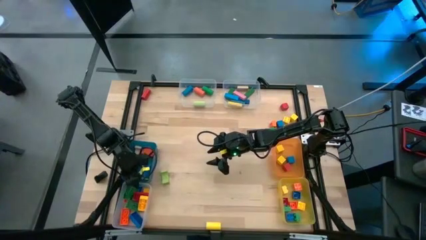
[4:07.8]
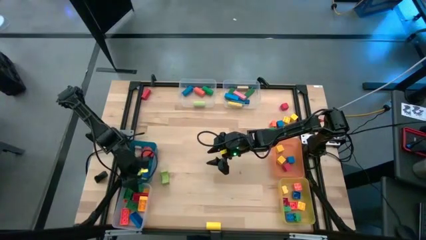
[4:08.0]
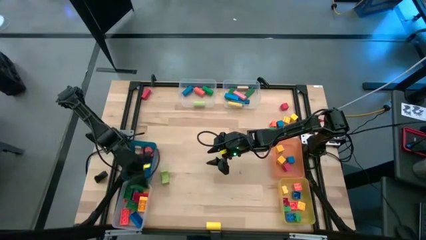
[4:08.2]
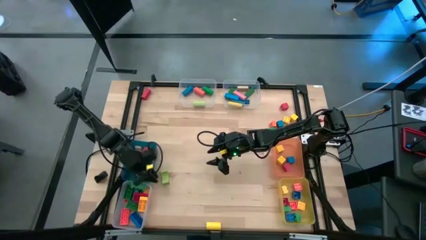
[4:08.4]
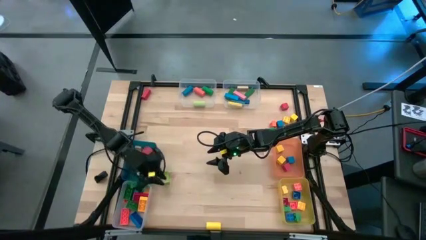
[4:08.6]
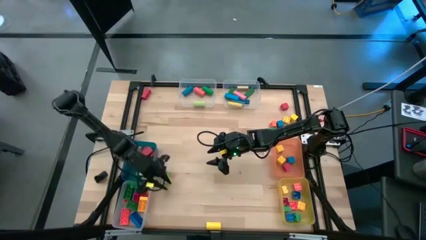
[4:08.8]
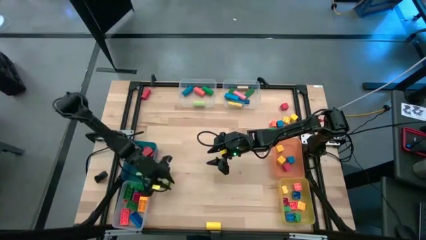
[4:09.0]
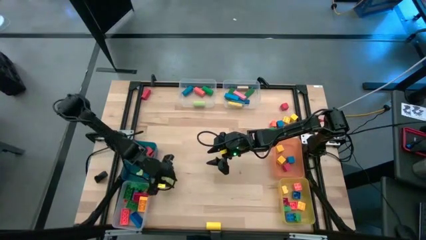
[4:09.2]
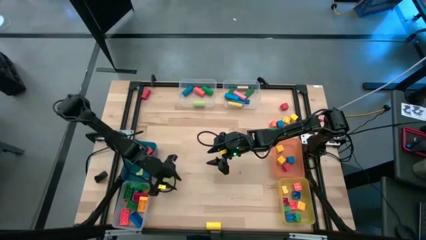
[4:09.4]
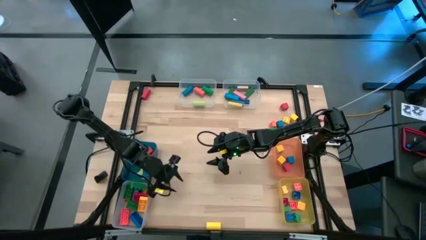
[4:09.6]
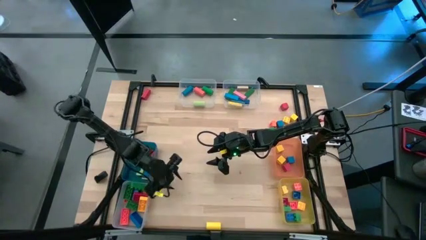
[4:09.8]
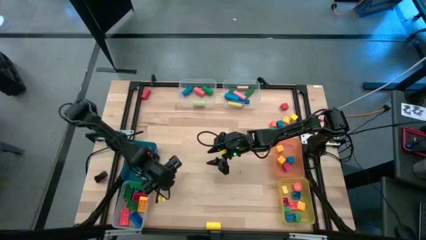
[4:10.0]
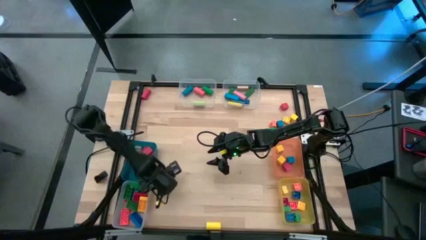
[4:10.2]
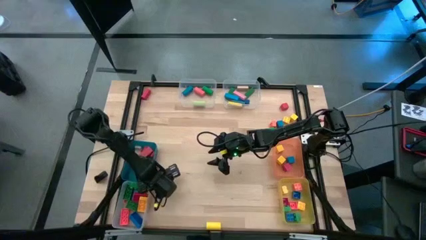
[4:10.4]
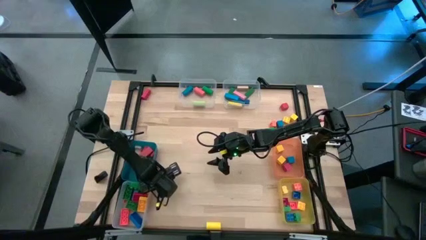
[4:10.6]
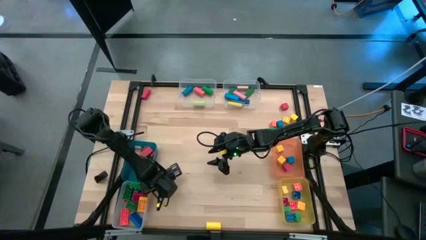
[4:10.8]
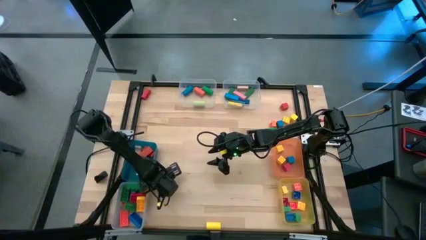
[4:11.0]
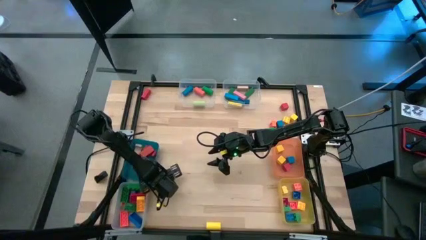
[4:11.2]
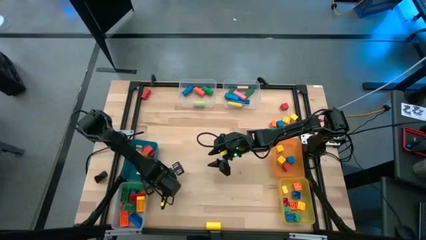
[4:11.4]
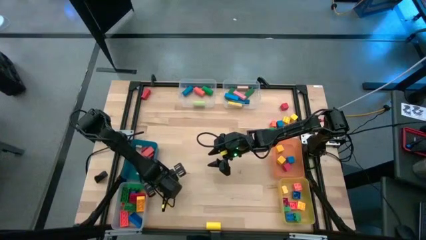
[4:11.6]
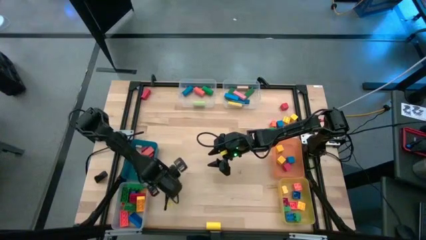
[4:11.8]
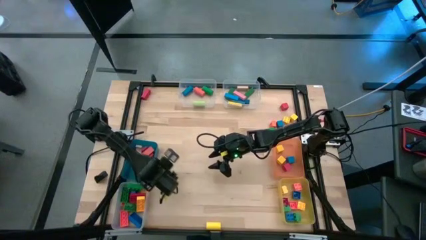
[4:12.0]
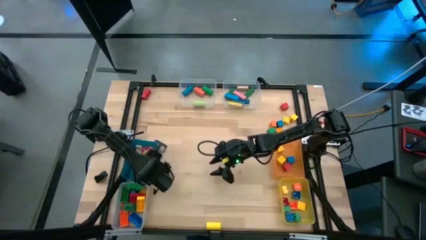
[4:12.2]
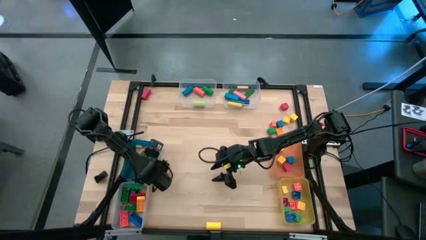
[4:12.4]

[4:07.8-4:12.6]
Task: Sort blocks by size
Put the light green block into the blue bin

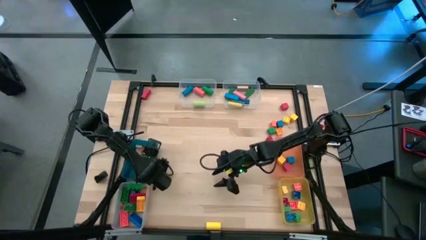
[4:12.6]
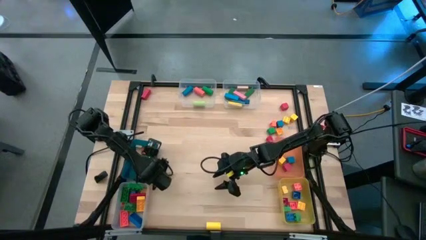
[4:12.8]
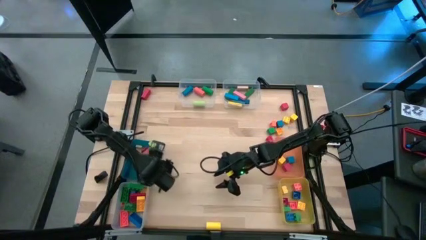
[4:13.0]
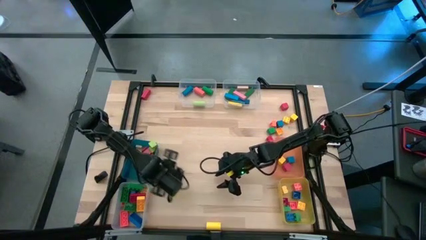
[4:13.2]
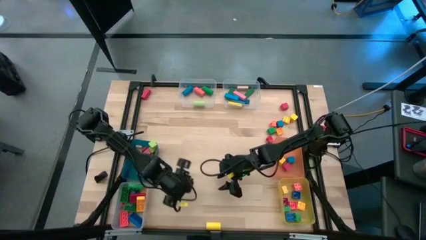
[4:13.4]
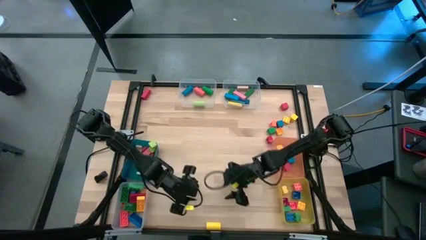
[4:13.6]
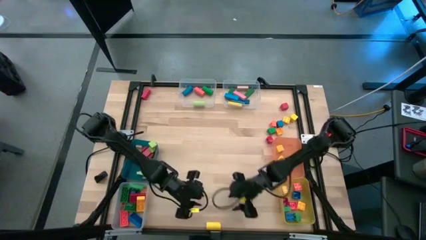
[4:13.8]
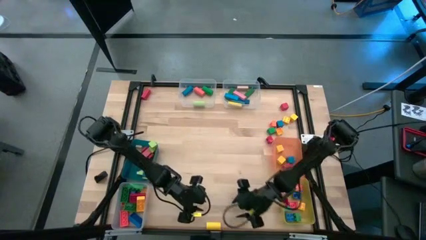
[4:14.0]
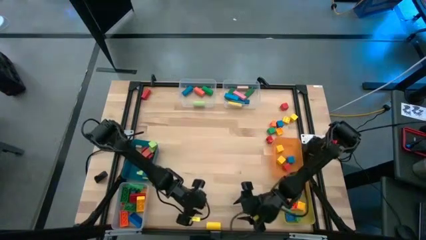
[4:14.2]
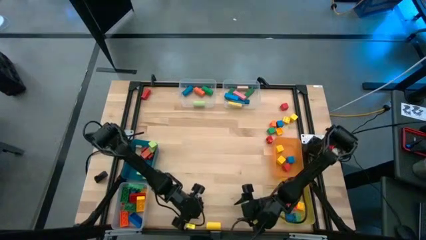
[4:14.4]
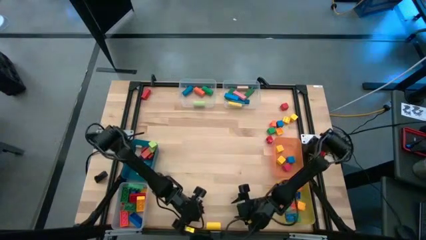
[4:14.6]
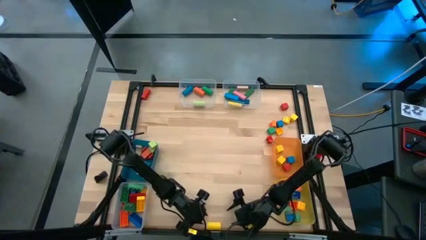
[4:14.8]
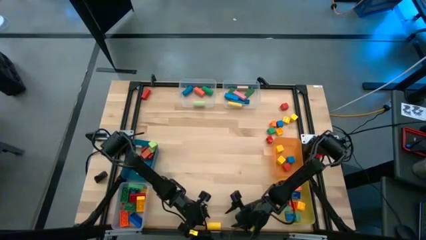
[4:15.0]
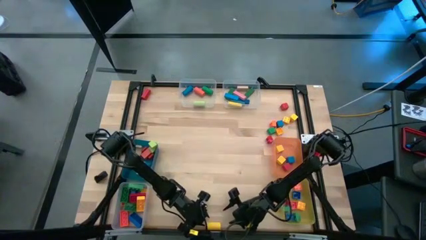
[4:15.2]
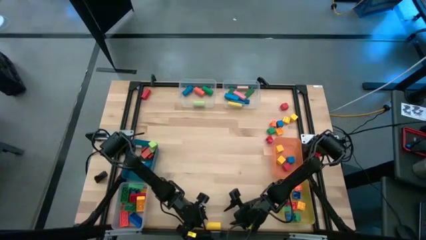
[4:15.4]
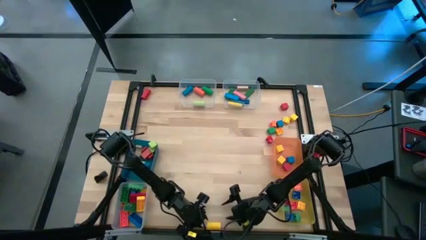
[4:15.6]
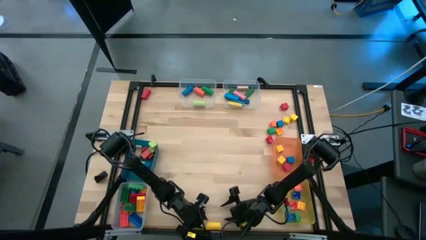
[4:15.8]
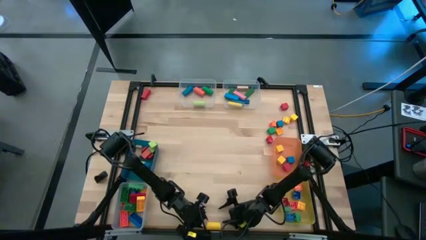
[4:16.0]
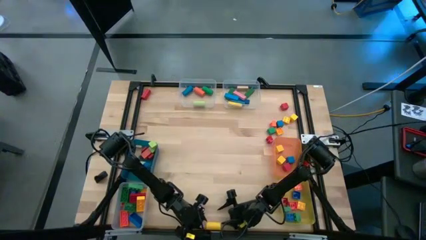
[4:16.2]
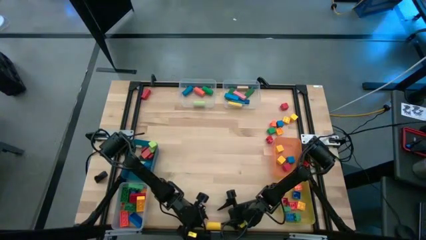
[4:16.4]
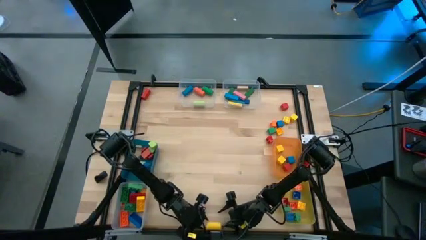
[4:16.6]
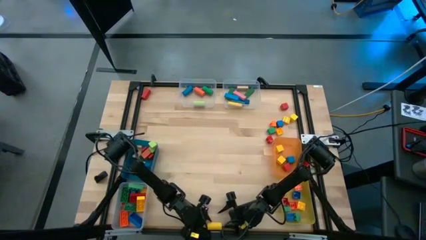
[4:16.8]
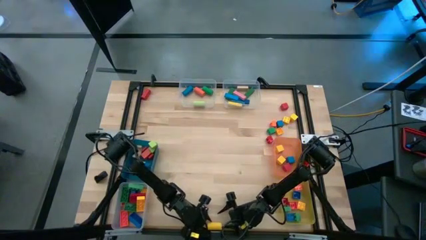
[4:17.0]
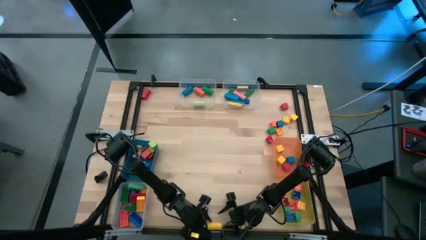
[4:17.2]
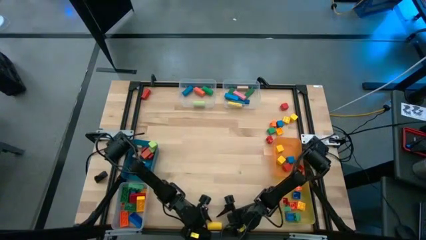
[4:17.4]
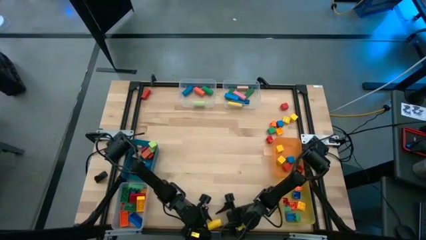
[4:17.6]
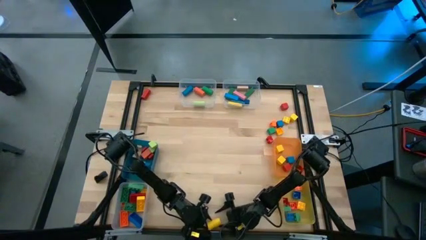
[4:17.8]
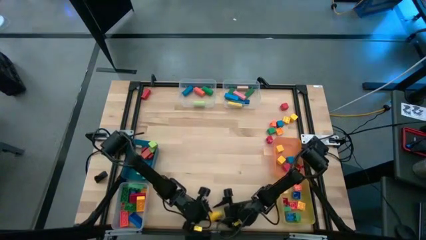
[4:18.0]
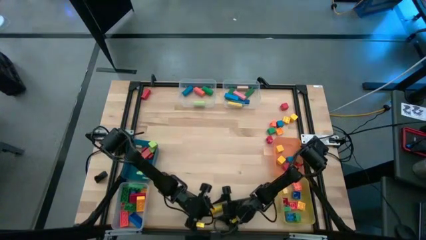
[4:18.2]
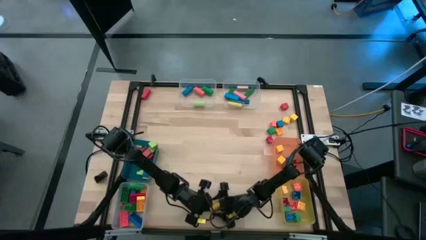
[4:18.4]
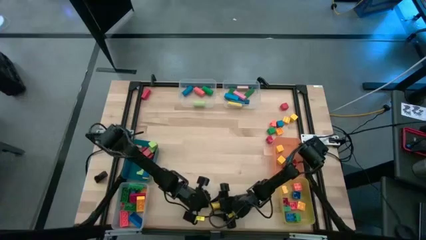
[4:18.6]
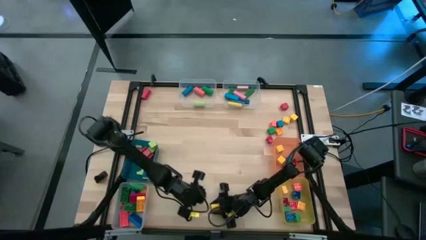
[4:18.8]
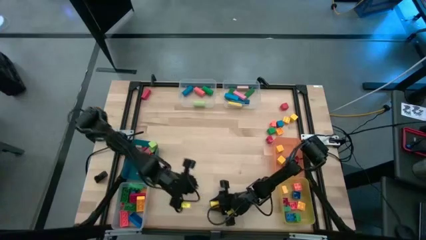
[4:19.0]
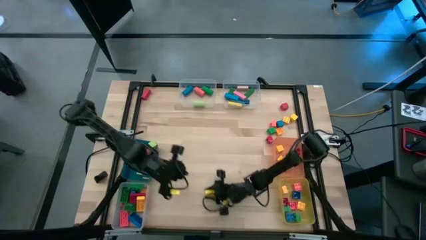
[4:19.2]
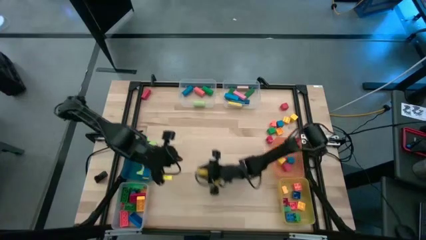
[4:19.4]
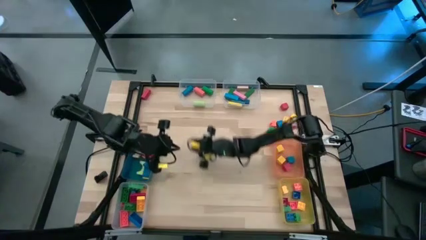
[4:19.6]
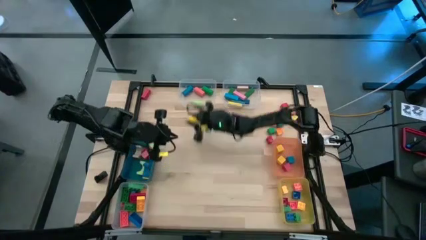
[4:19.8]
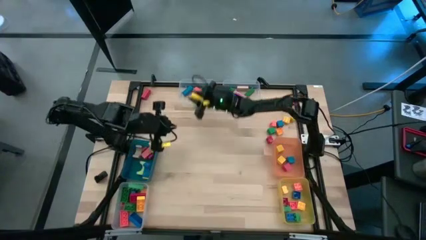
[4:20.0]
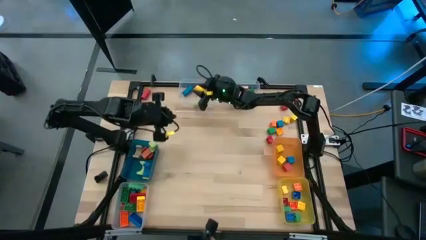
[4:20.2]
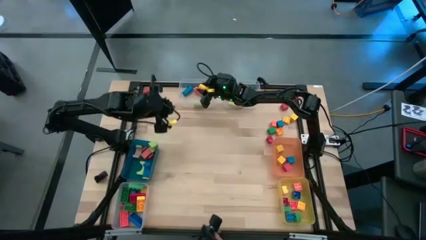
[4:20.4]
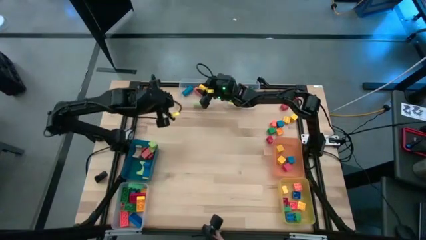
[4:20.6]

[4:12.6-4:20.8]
Put the yellow block into the top left transparent bin

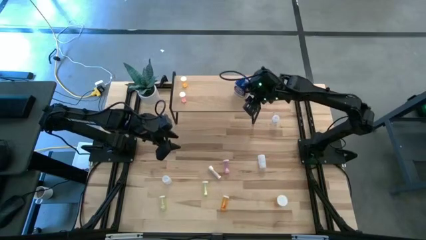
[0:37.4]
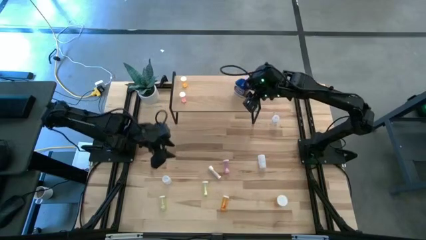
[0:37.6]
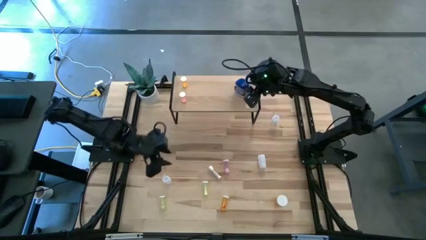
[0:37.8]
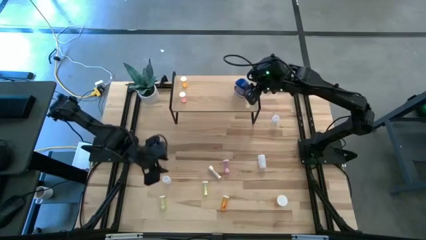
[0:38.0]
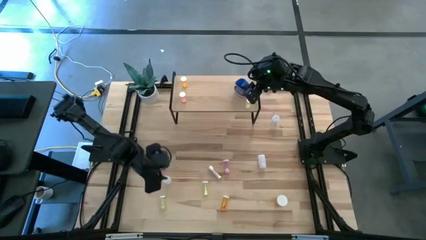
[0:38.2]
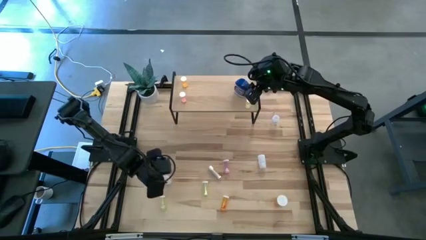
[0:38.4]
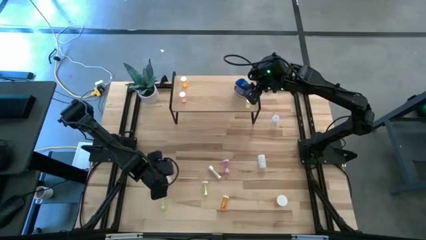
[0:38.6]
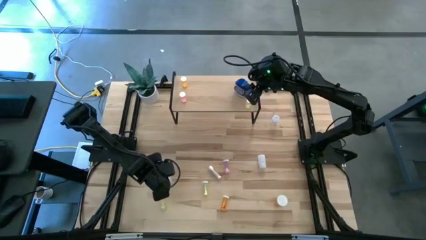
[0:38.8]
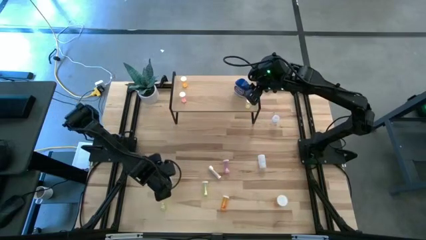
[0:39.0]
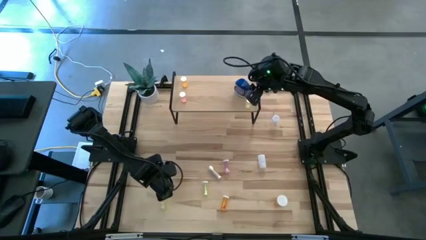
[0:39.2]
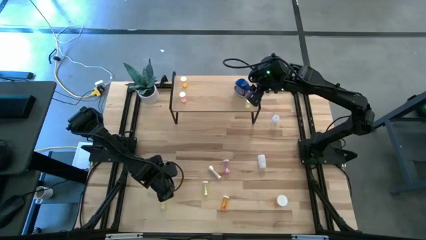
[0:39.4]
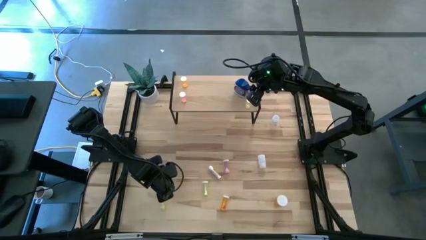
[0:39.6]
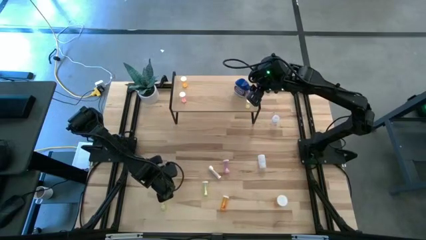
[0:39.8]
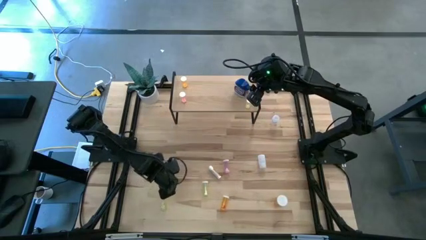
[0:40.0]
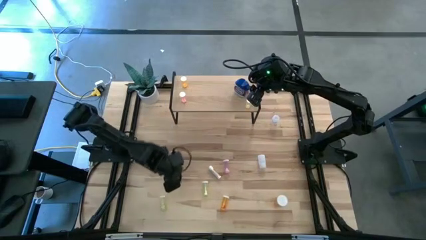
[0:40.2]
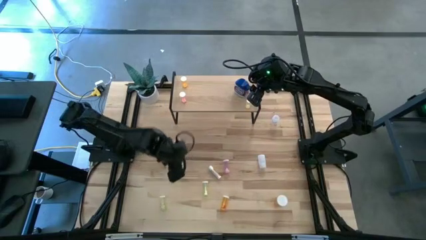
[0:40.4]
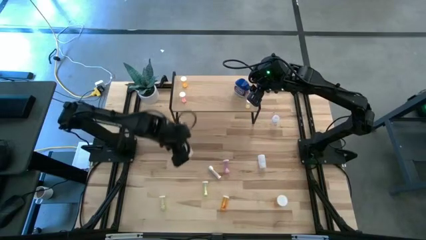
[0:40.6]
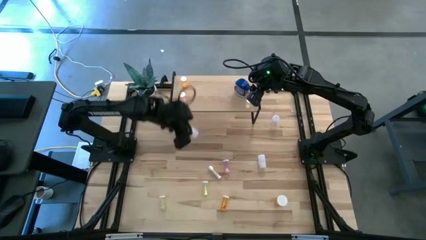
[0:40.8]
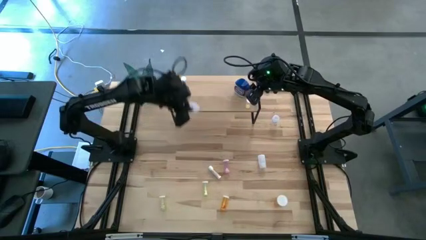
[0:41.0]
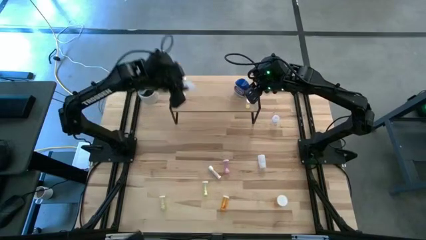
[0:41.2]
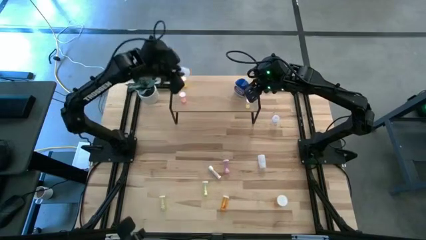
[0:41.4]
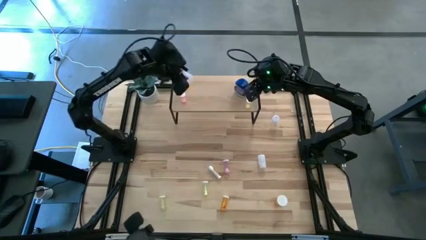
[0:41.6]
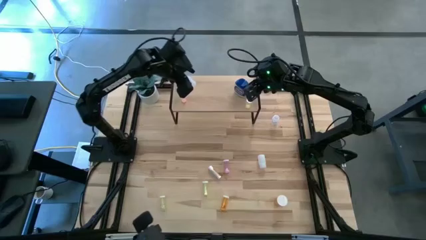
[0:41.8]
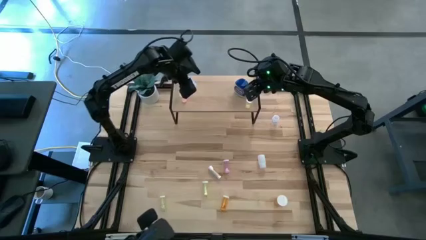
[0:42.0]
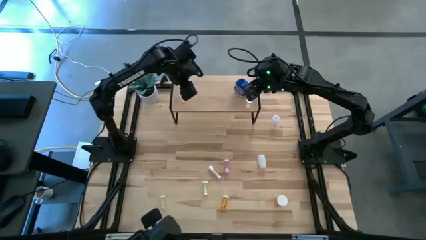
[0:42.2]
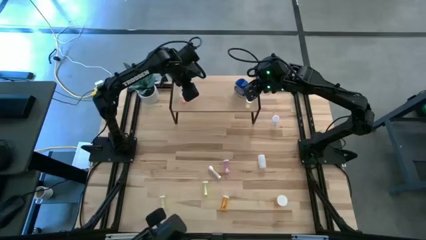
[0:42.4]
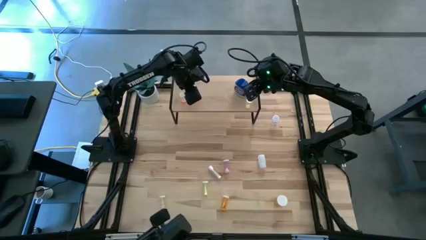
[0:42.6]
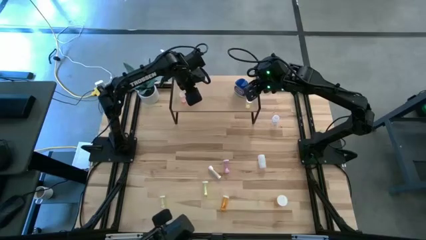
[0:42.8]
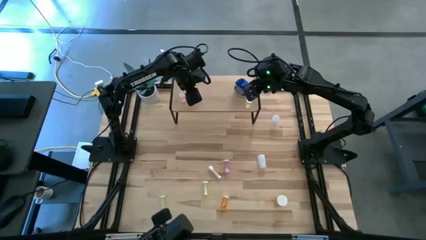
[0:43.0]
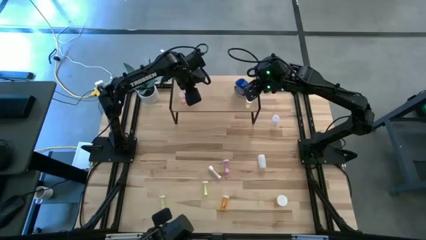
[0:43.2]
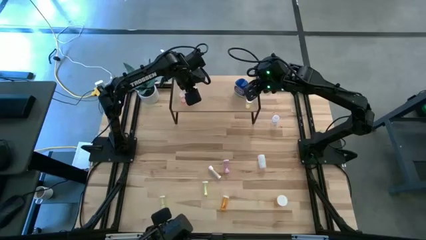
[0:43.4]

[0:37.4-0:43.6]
Task: Pick and place medicine bottles onto shelf by color
Put the left white pill bottle on the shelf
